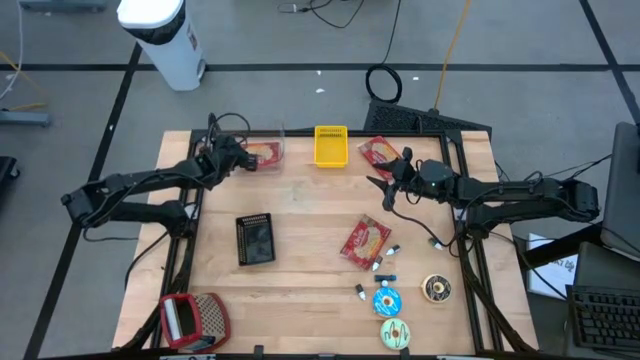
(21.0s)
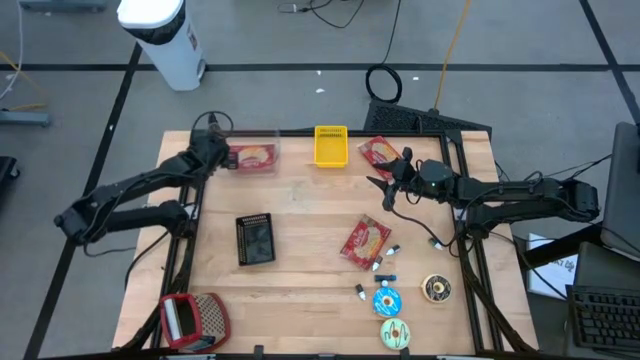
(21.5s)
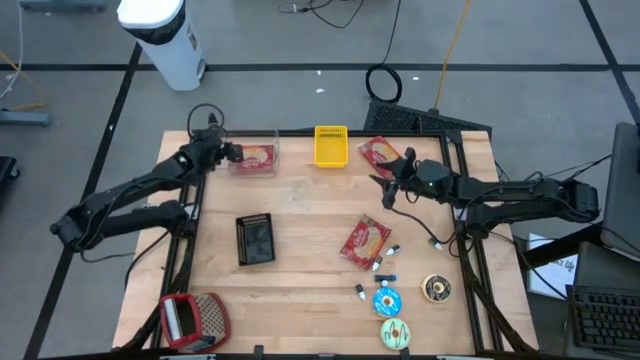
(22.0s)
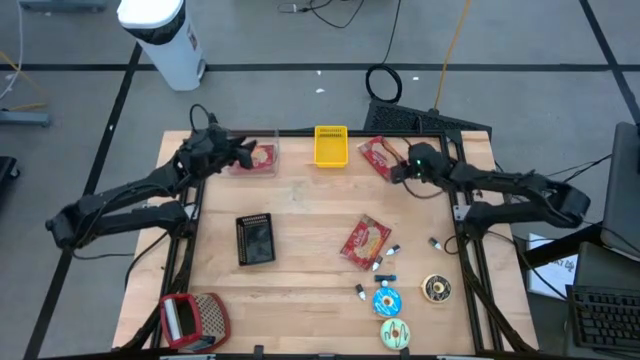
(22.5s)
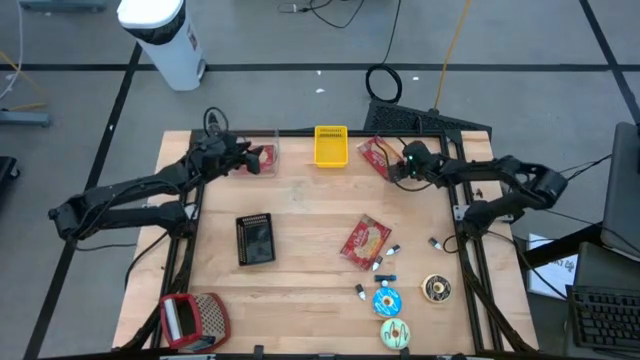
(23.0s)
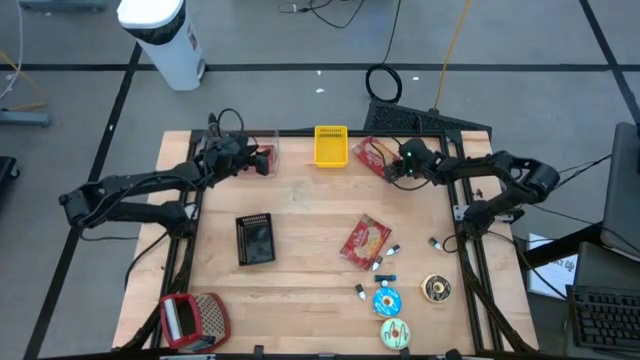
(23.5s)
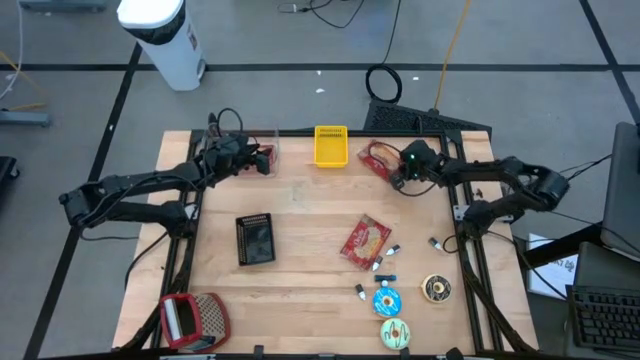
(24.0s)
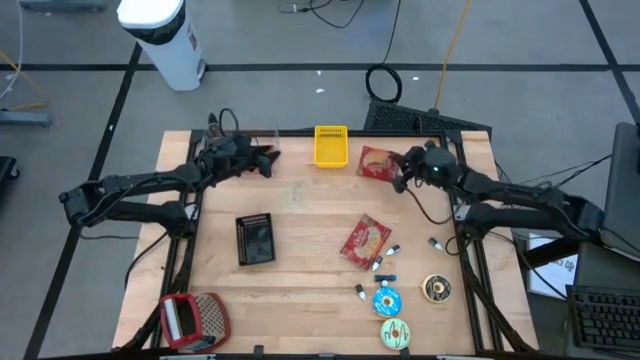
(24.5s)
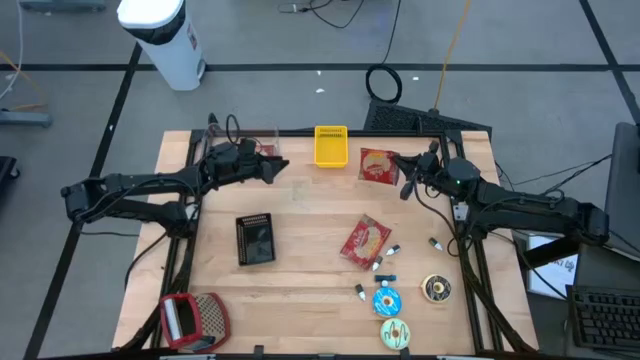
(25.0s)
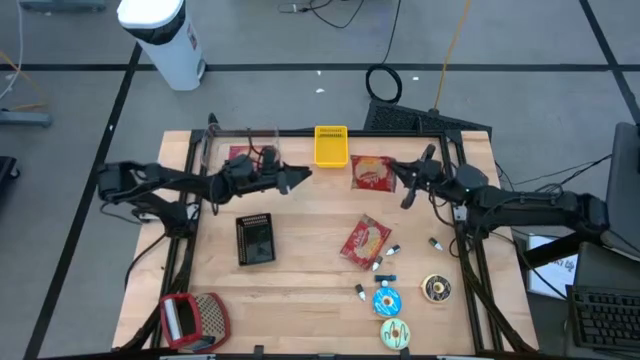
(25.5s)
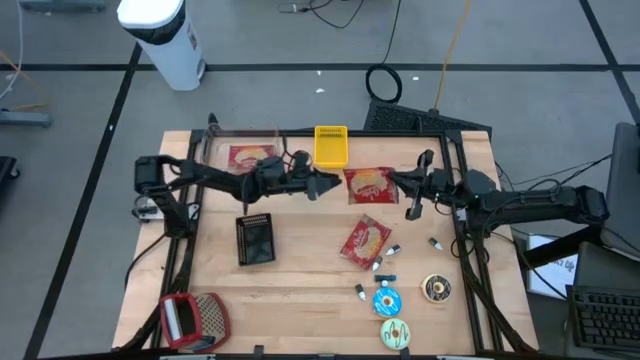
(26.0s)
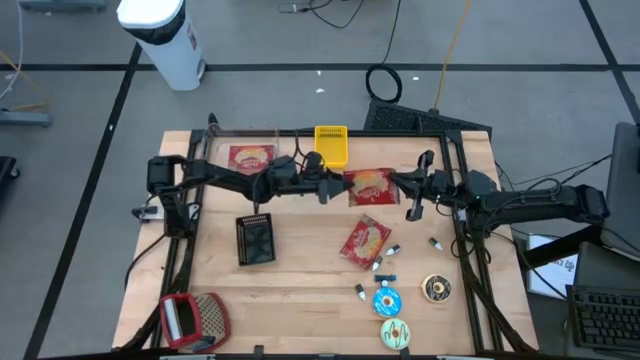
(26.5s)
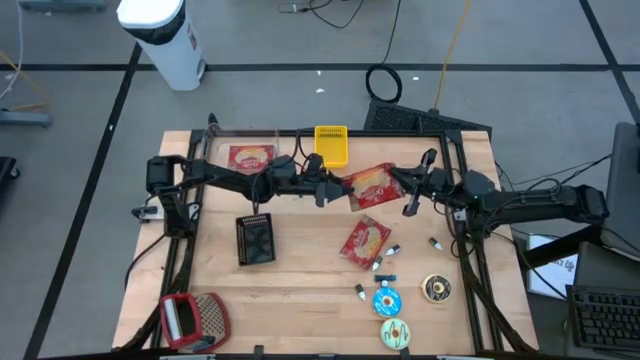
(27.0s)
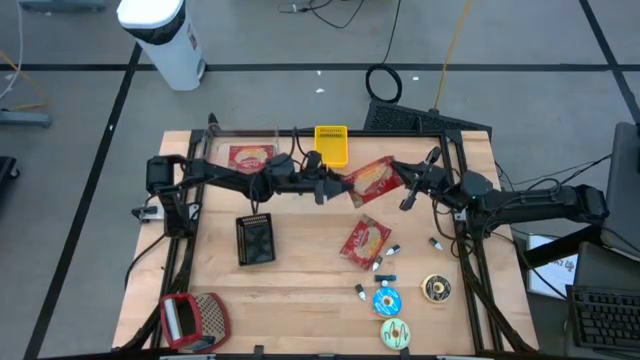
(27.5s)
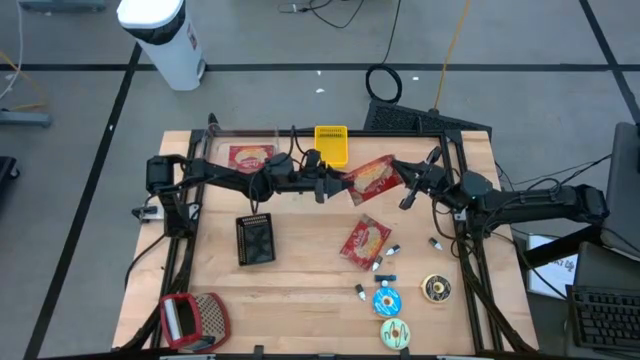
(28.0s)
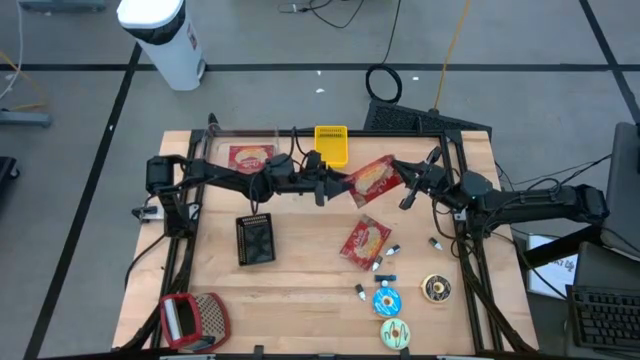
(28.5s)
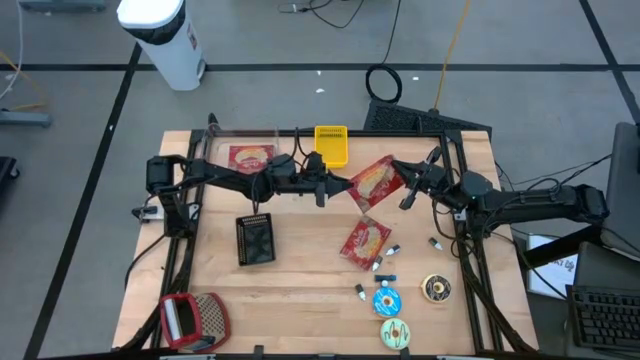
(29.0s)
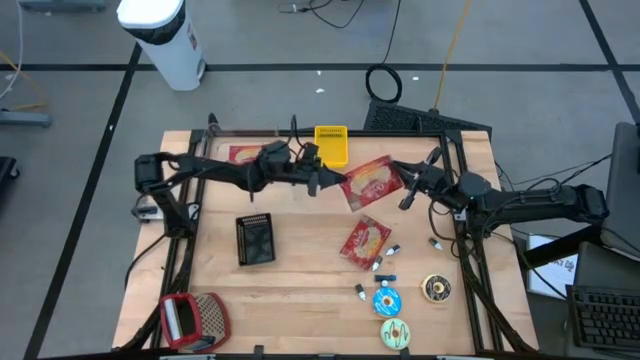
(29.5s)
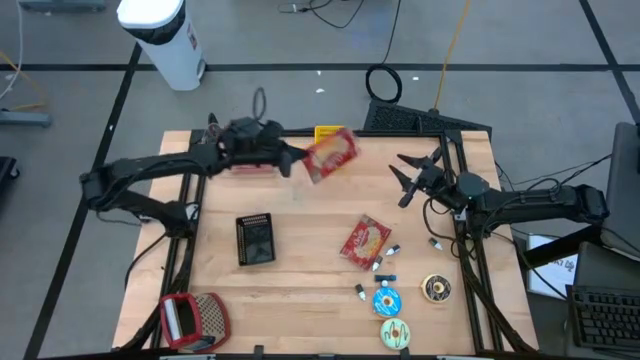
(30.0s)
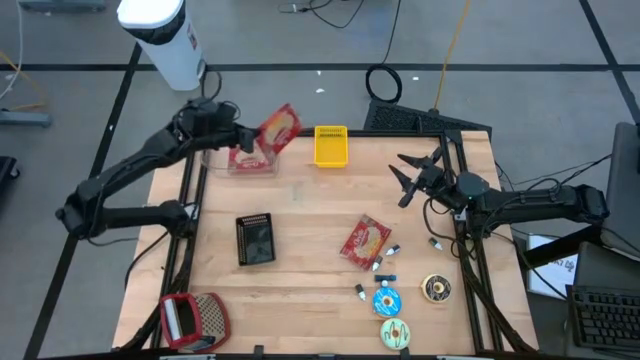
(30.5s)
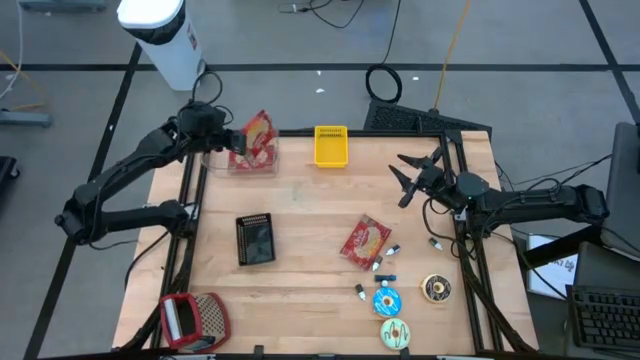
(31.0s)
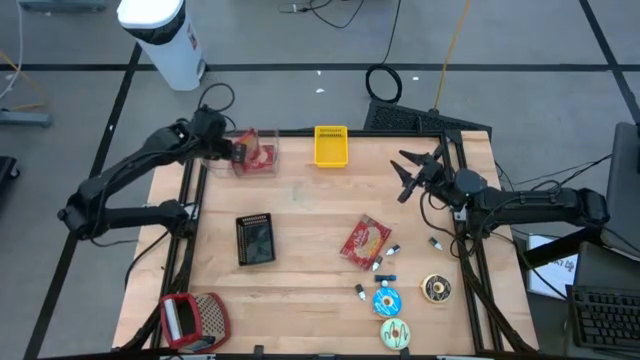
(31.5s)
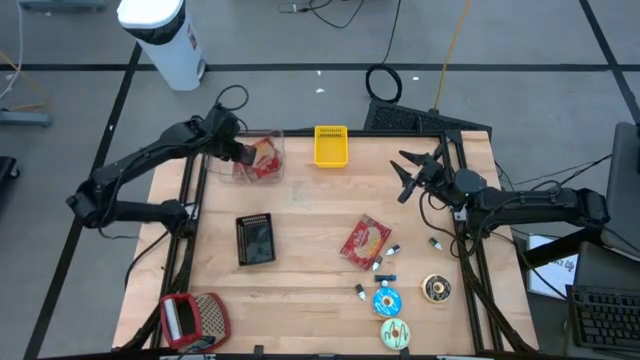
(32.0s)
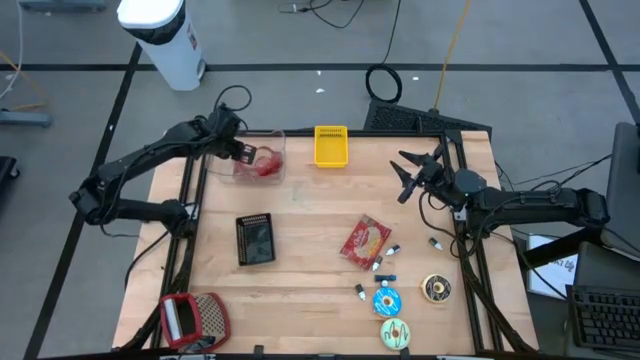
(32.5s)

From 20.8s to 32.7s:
Task: Pick & Place Food Item
Put the top popcorn pack into the transparent bin

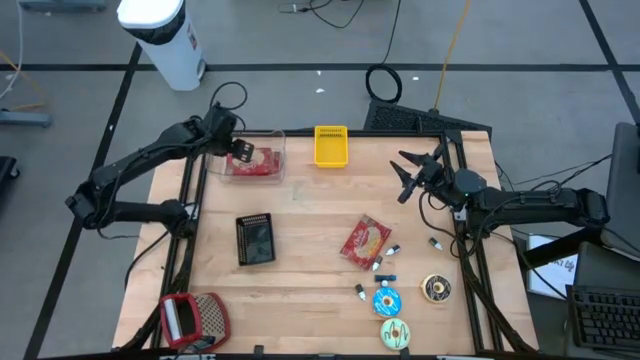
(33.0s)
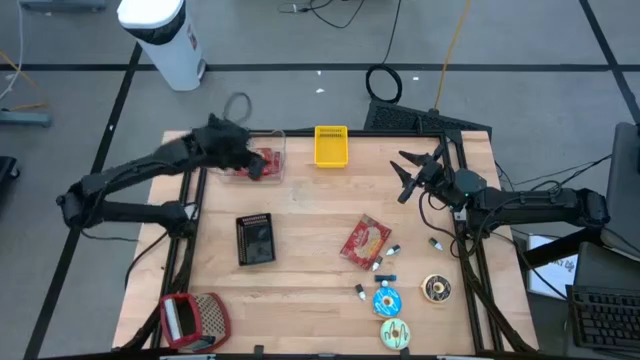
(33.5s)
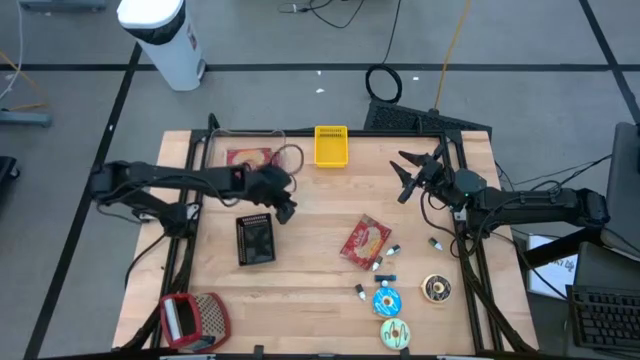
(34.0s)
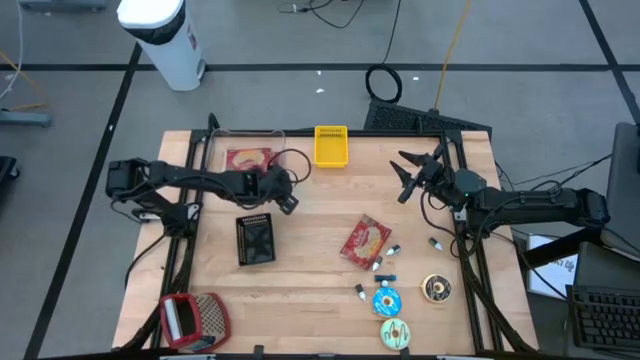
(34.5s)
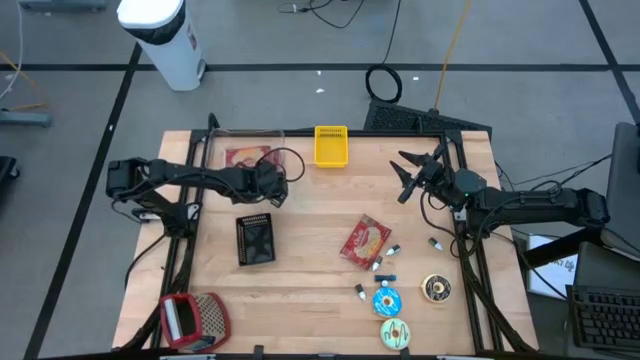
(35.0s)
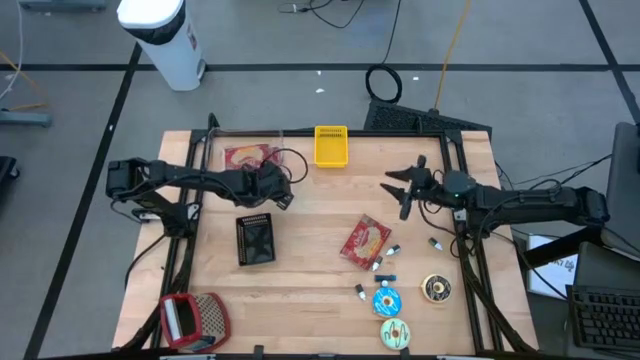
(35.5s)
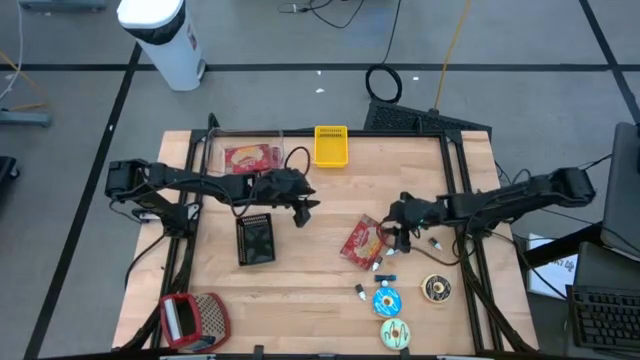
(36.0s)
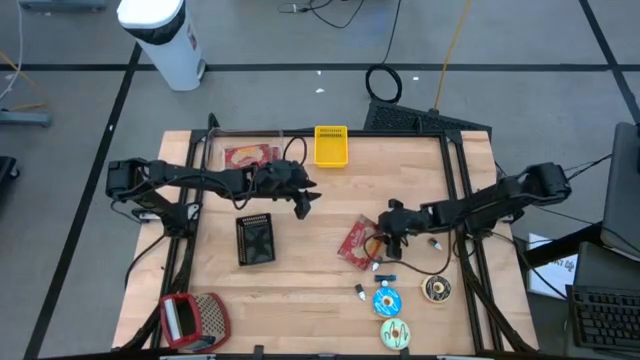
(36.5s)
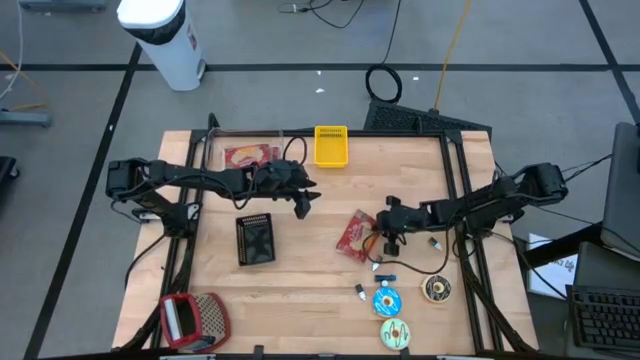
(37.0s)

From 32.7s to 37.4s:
Put the popcorn pack into the transparent bin

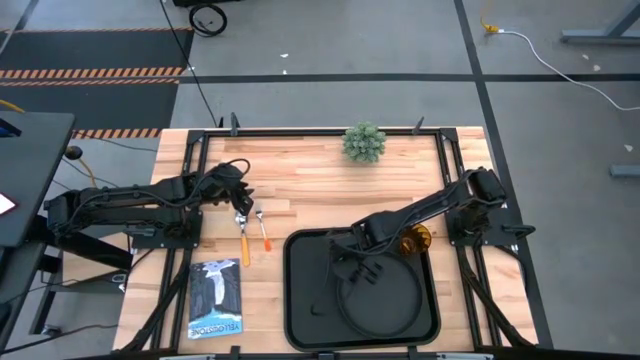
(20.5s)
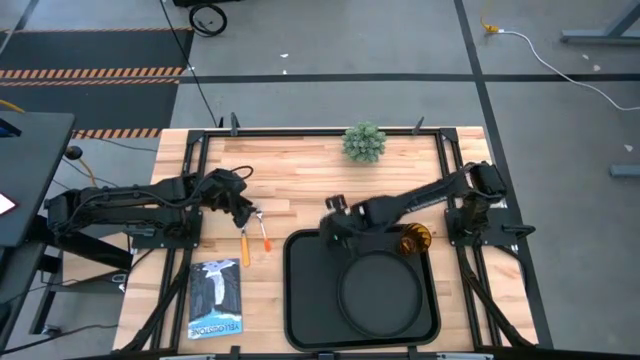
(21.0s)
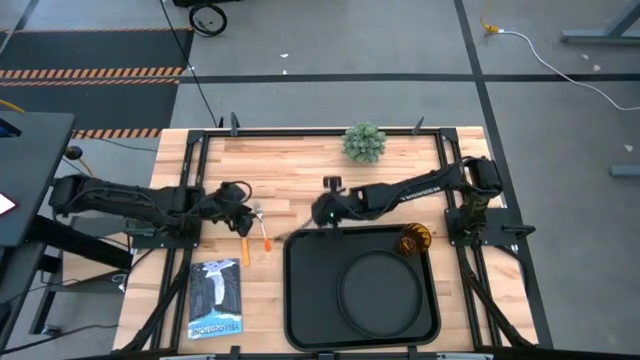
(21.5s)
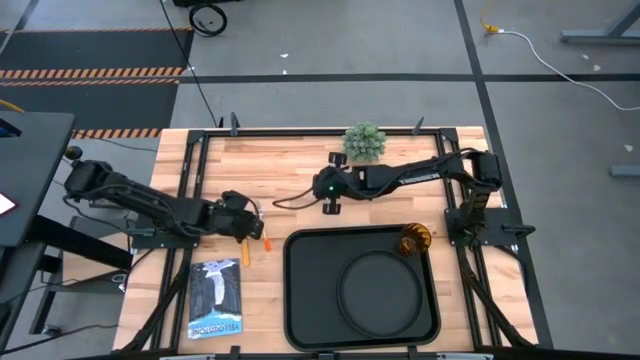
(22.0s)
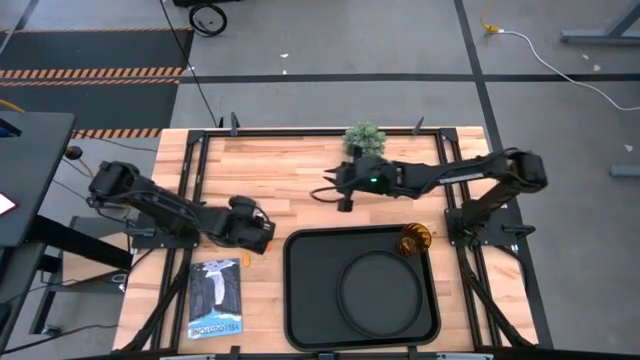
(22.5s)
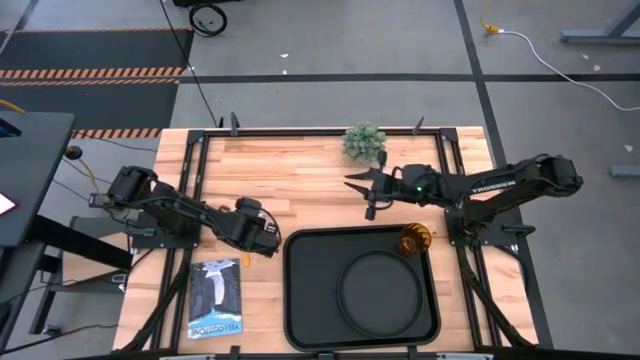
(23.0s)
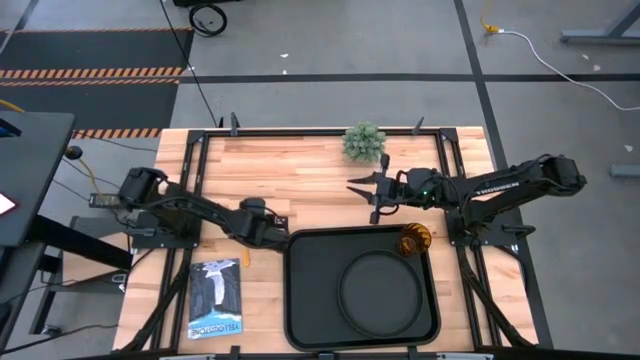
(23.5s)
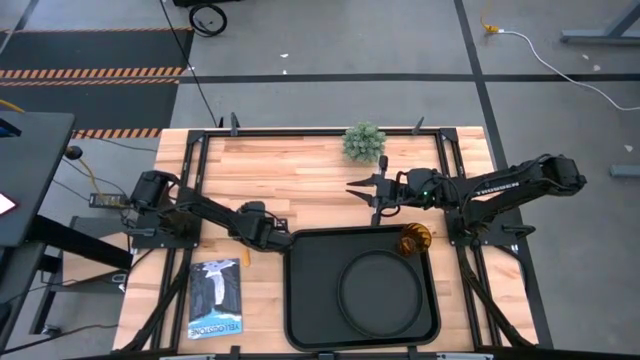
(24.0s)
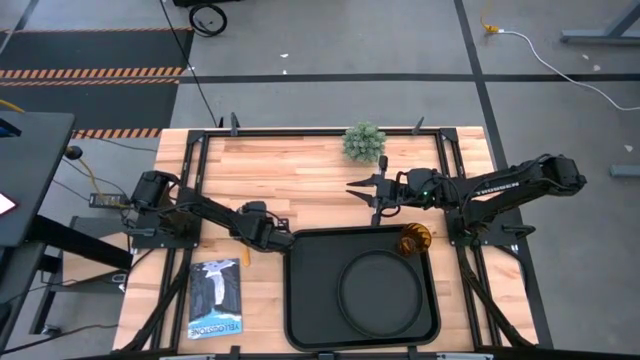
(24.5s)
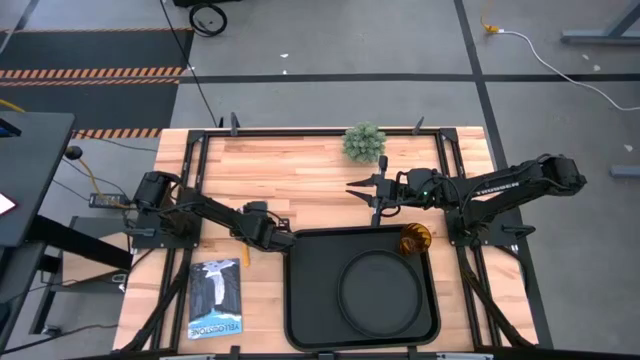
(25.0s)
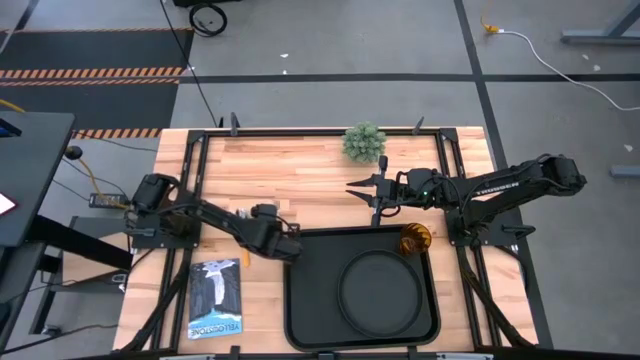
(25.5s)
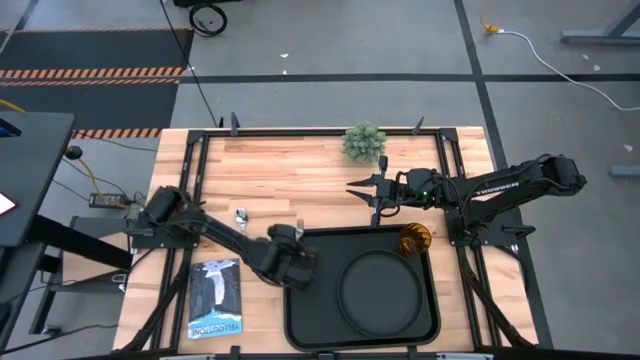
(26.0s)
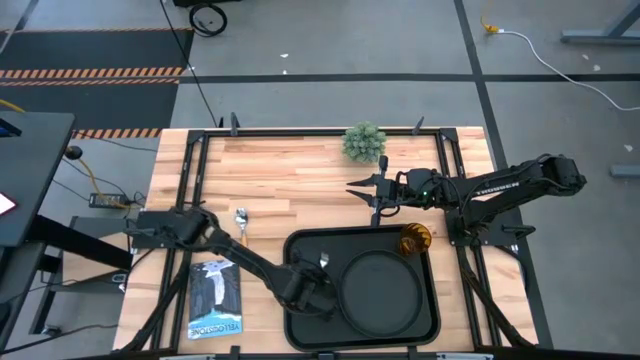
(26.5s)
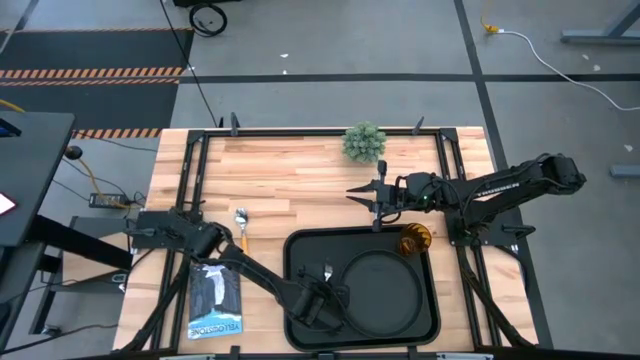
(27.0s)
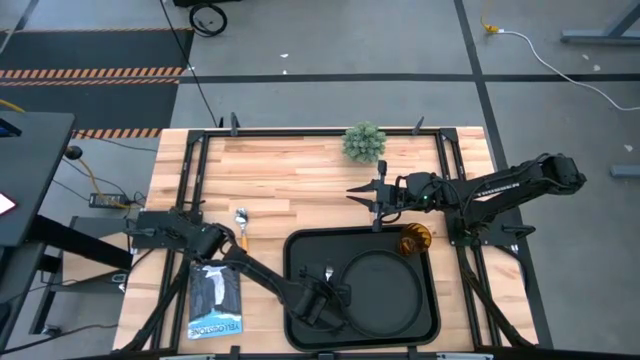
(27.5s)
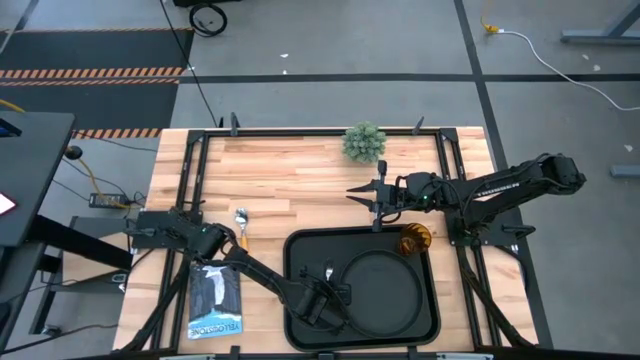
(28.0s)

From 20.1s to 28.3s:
Task: Pick and place plate/cup/fork/spoon on tray
Put the white orange fork on the left side of the black plate
